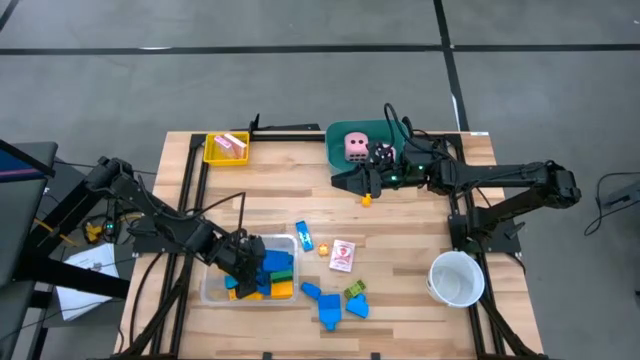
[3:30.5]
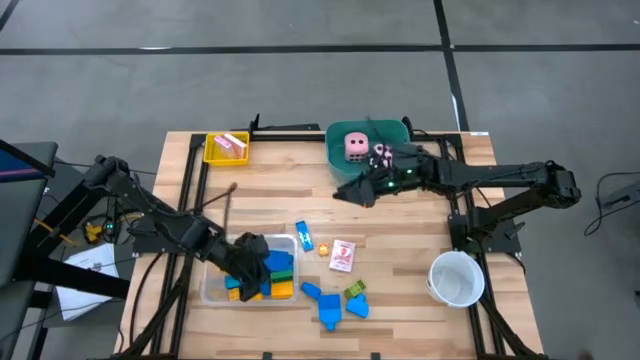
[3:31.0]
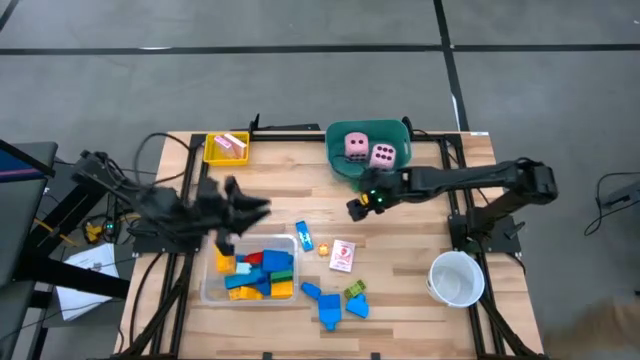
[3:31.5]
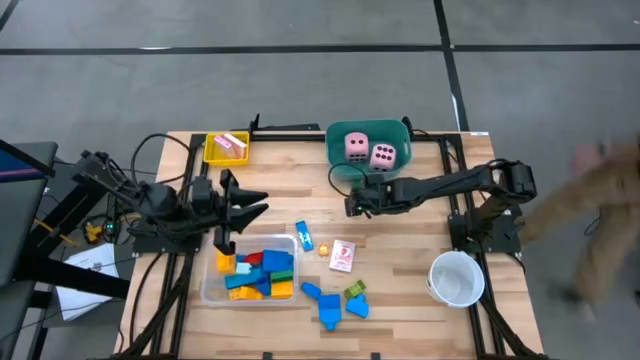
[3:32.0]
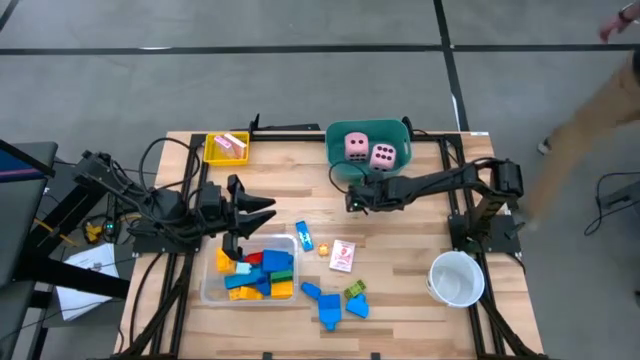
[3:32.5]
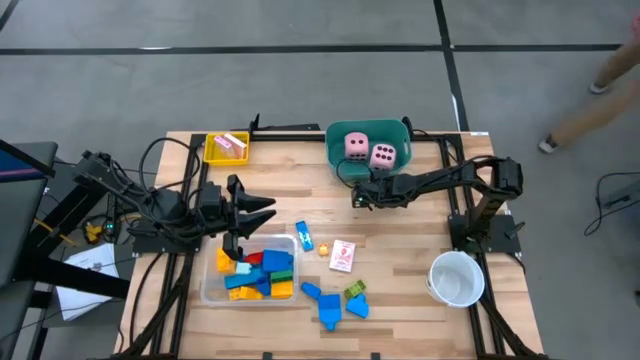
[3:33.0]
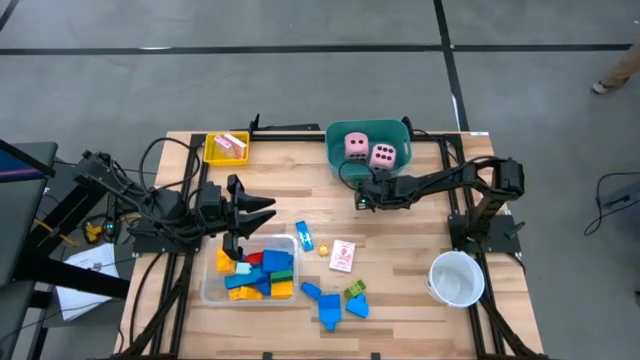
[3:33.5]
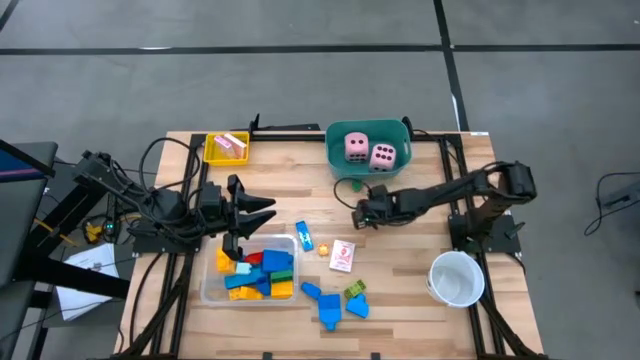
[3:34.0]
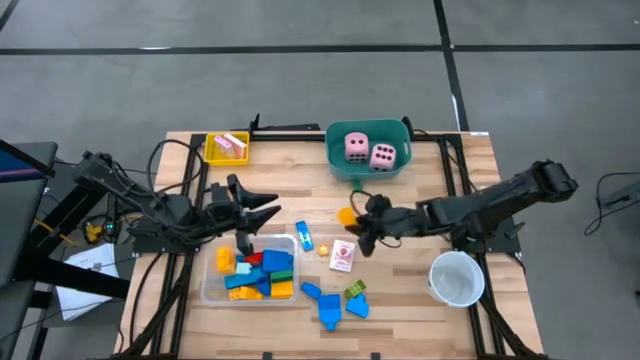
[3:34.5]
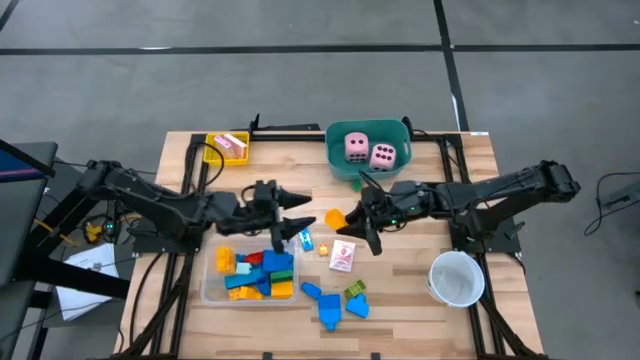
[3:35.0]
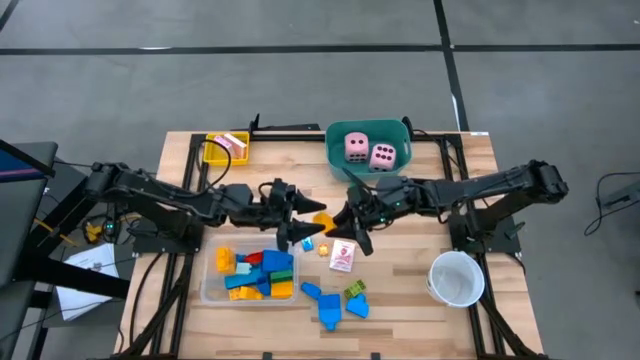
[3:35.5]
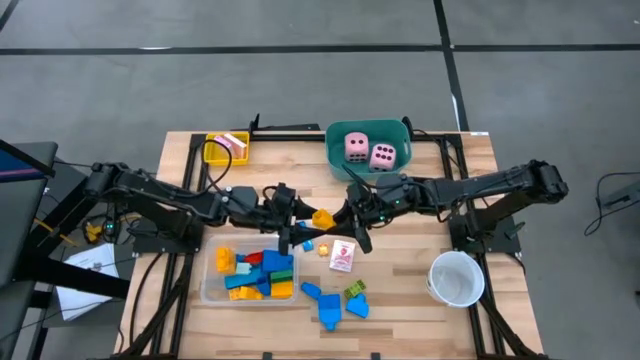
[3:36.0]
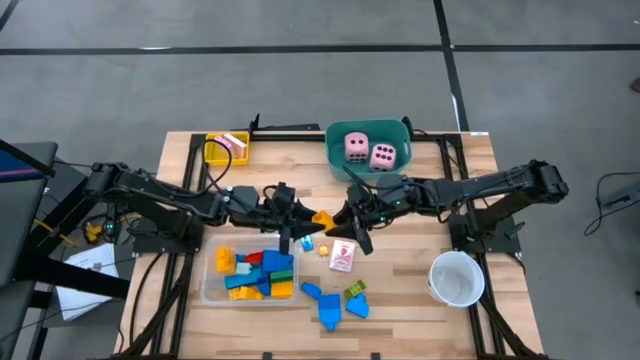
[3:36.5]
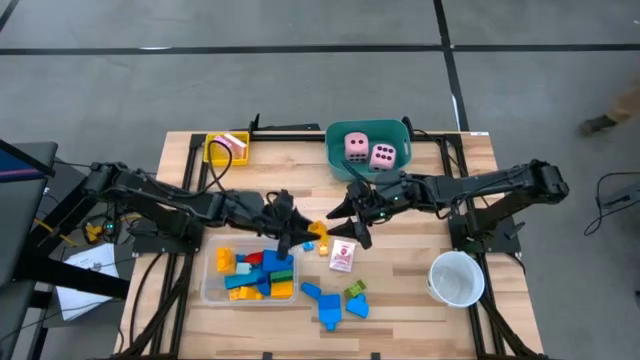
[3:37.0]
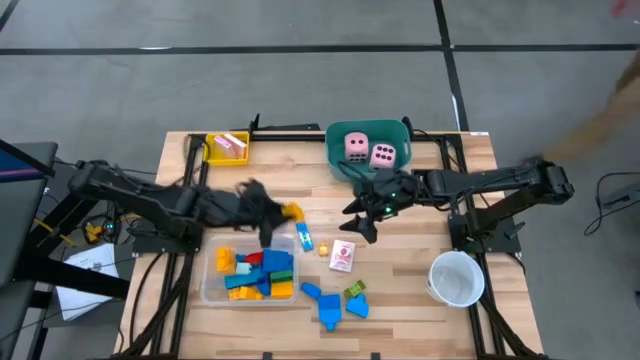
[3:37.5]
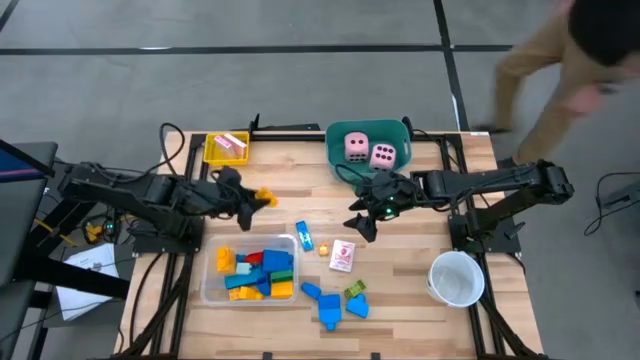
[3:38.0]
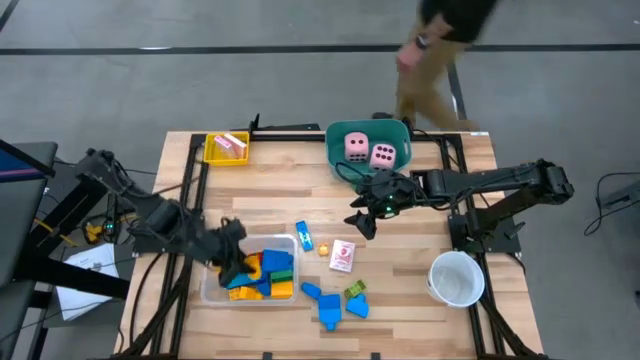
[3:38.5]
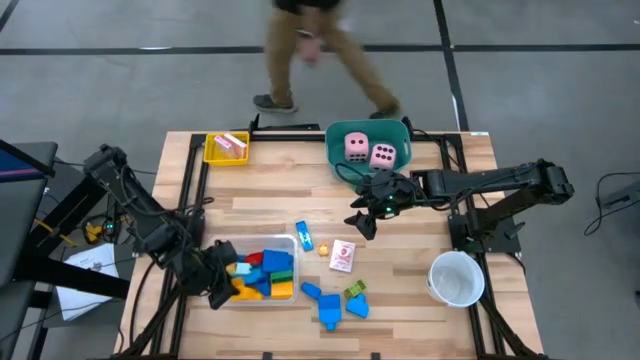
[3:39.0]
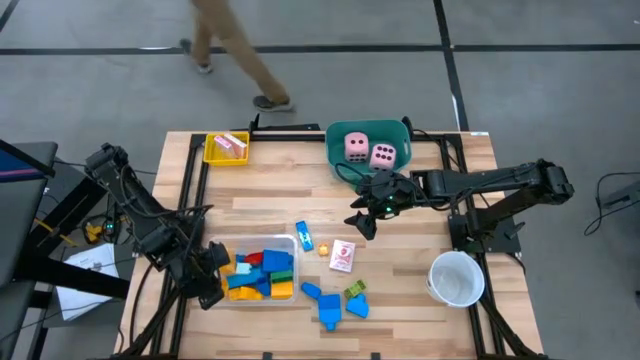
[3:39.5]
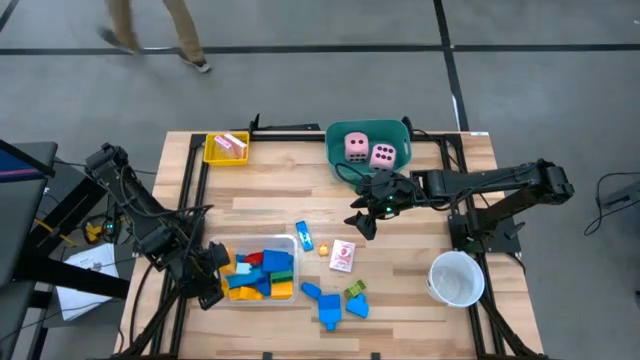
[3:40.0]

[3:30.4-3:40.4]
Task: Pick & Place Toys
Put the yellow game piece into the transparent bin

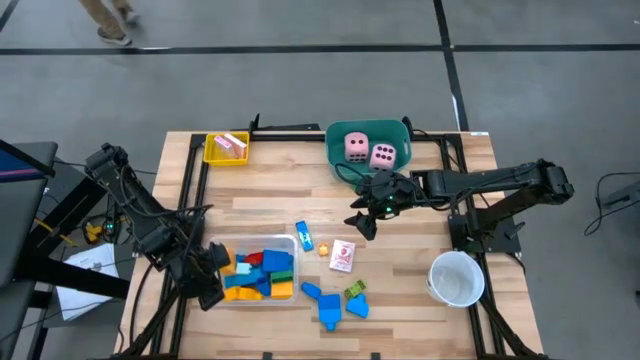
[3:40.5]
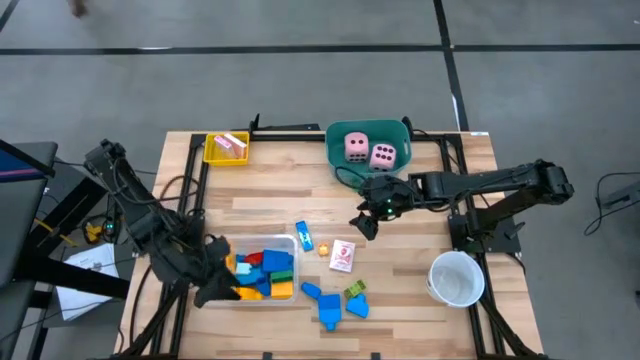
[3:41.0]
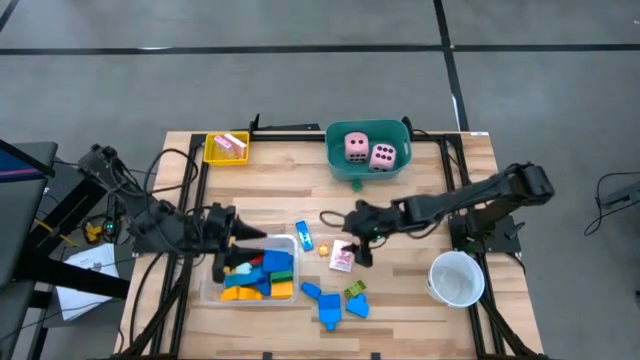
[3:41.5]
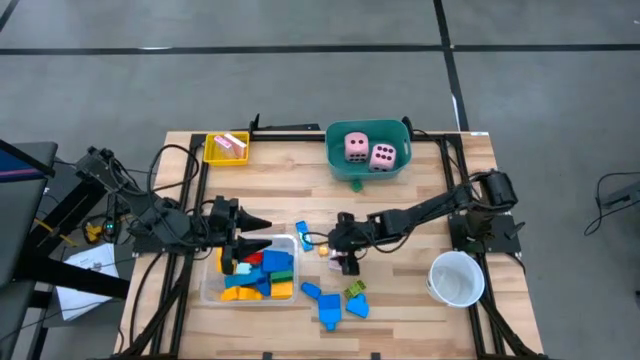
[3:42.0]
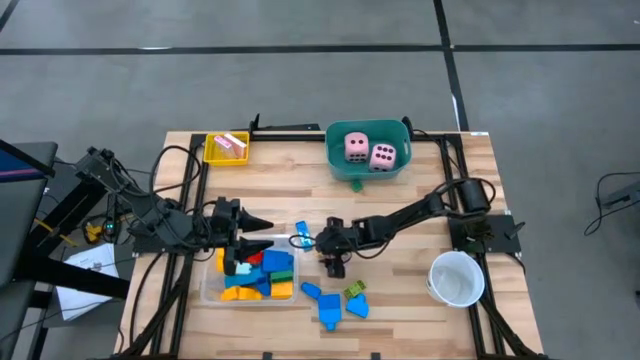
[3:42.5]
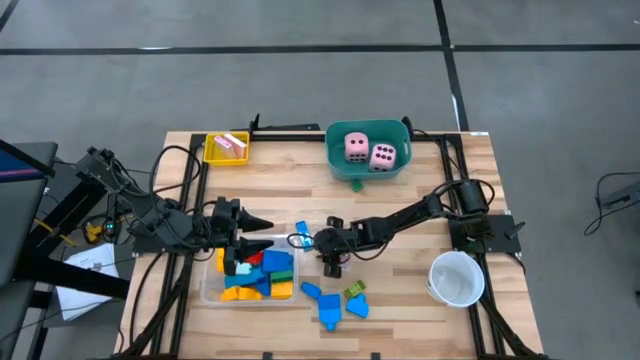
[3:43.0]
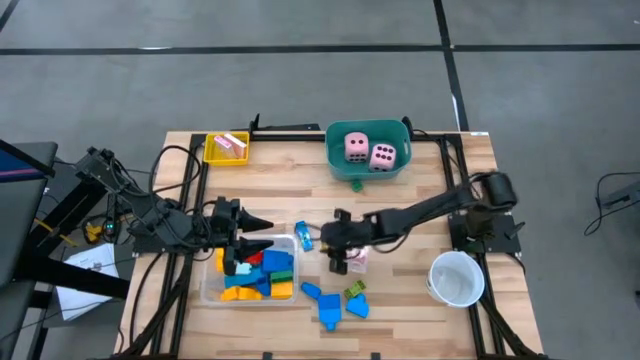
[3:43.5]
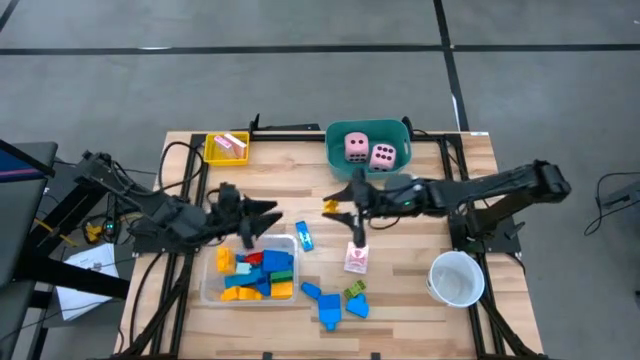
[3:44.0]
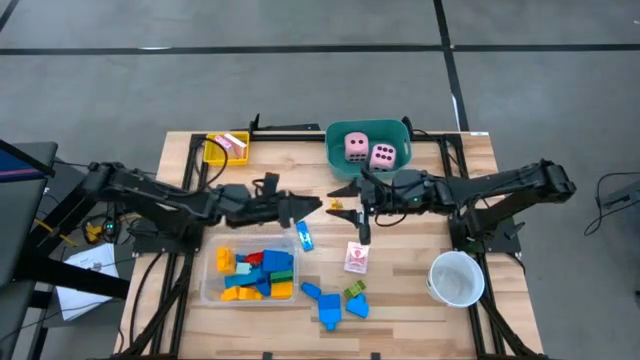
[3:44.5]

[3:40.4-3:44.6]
Put the yellow game piece into the transparent bin

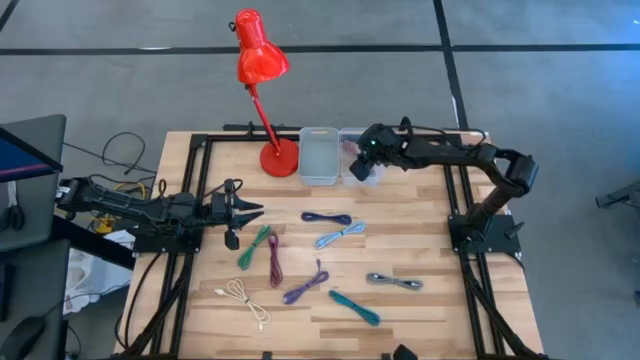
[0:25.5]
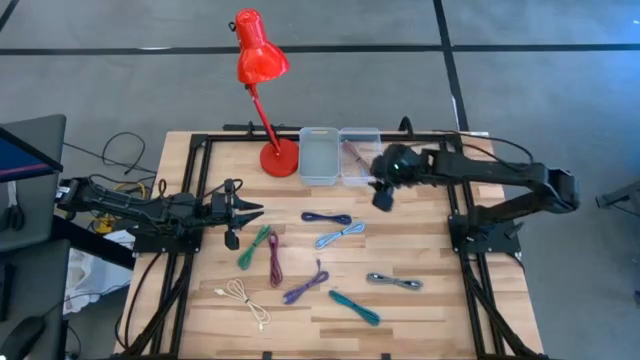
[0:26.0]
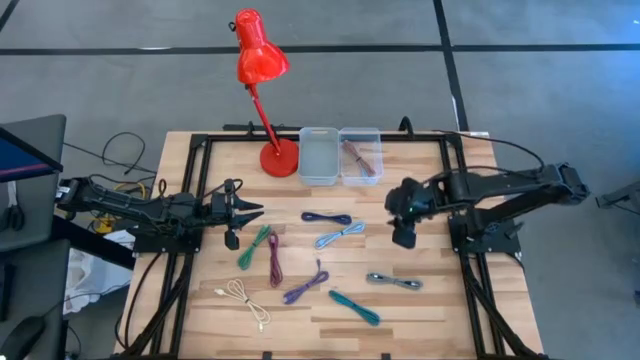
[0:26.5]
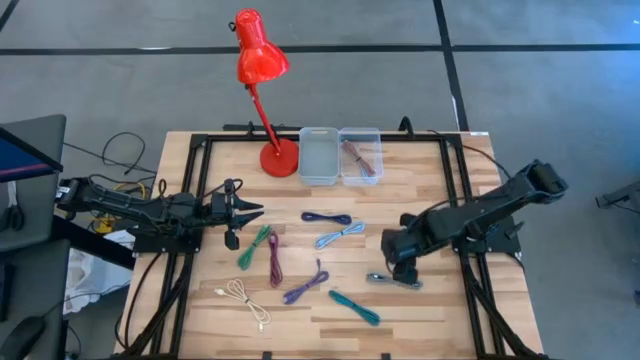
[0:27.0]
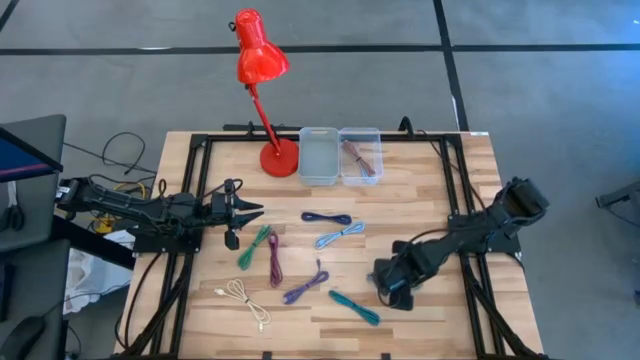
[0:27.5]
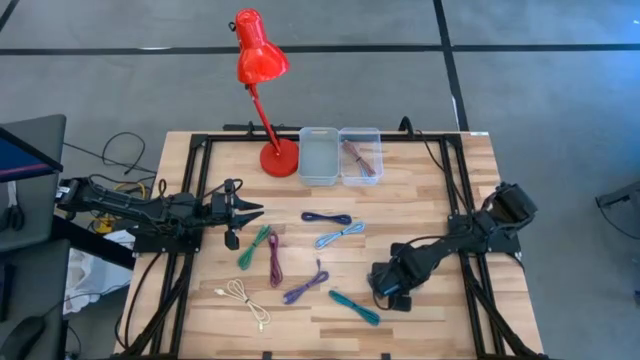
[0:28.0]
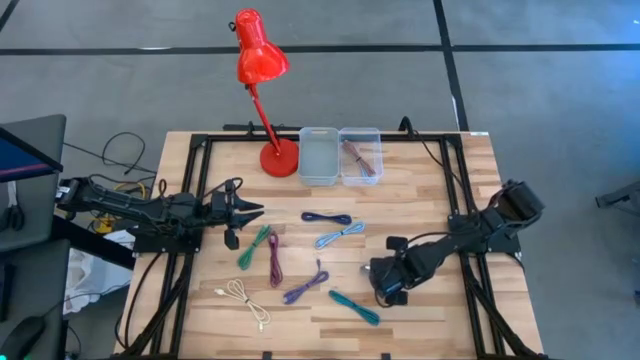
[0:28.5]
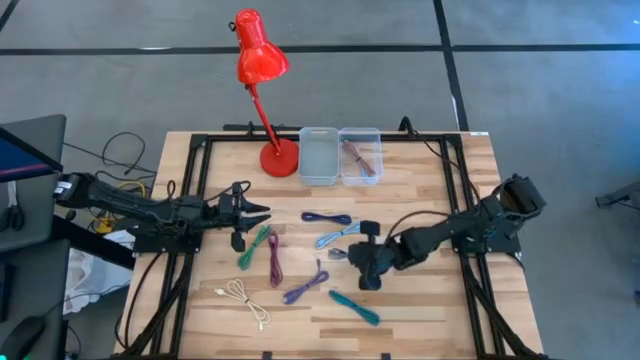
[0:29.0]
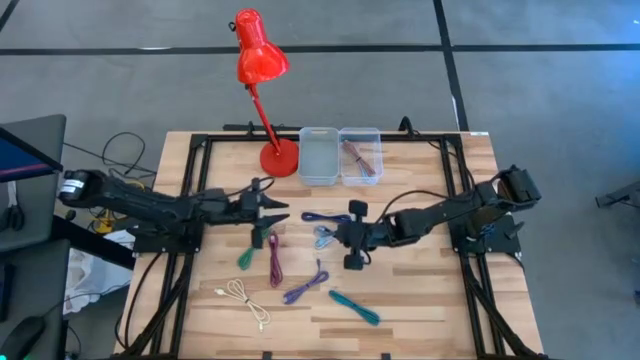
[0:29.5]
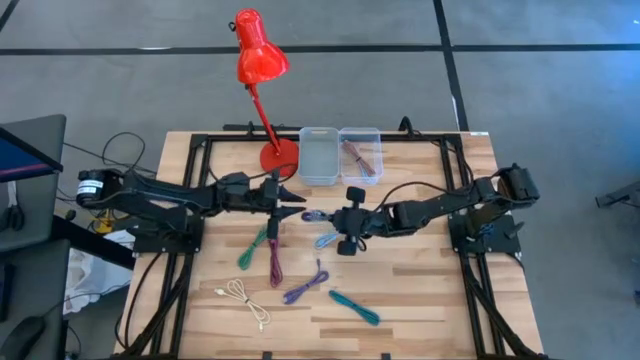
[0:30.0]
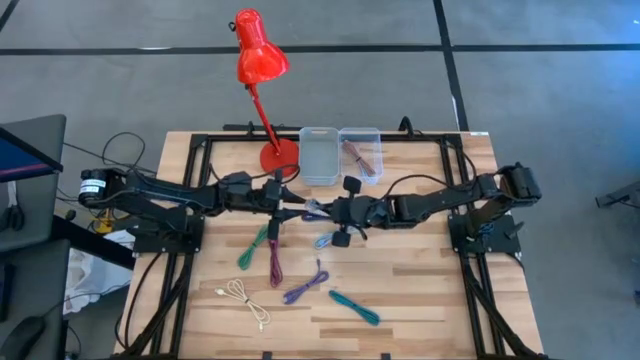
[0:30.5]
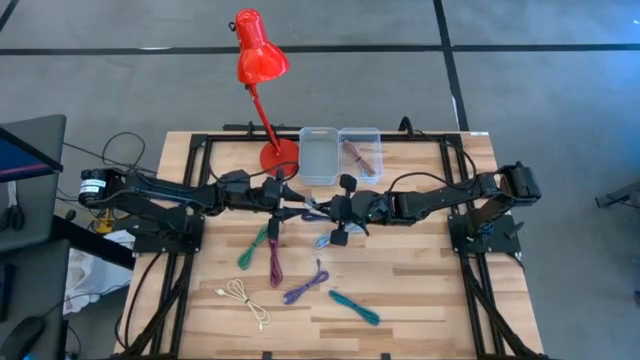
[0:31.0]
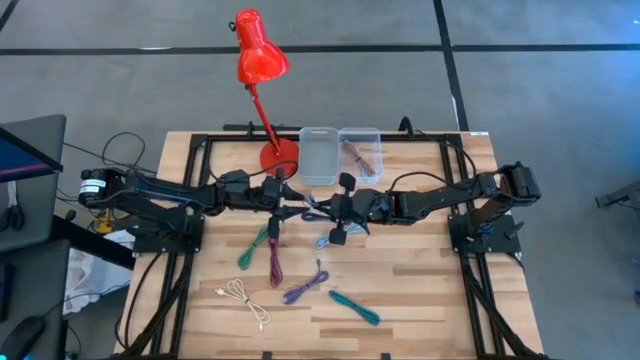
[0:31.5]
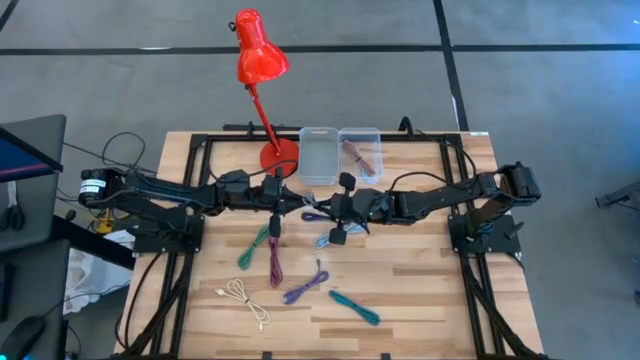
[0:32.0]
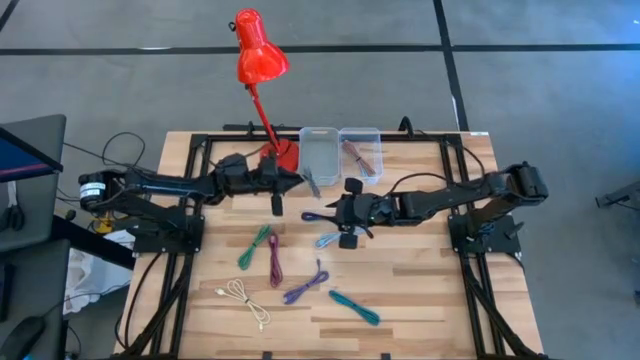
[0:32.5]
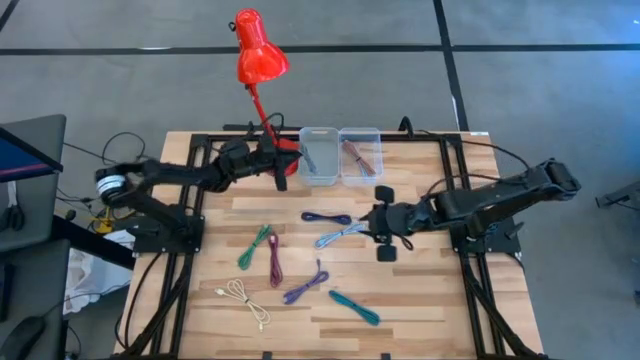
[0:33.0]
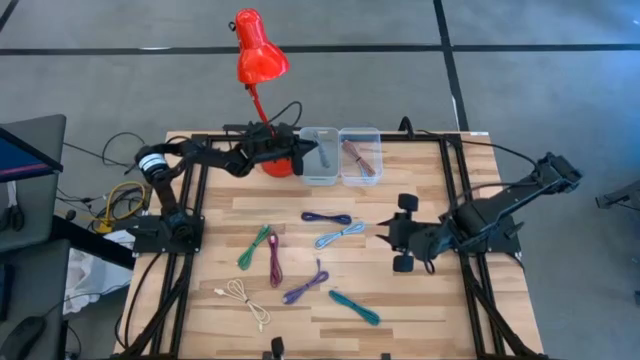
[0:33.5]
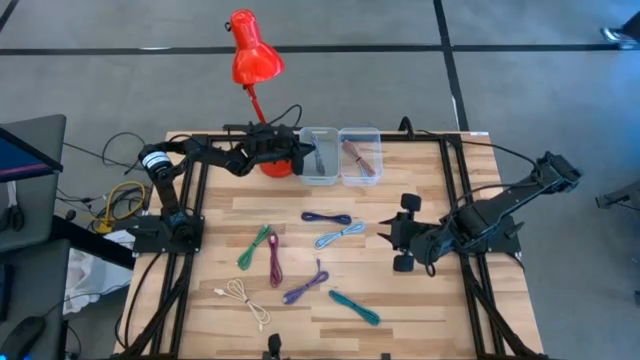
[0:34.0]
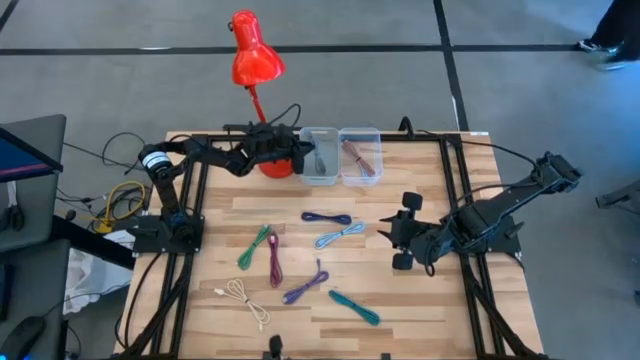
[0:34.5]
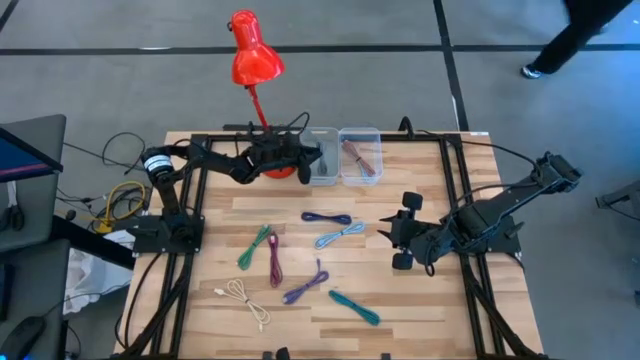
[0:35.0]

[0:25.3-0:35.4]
Task: Pick & Place USB Port
Put the black and white charger cable into the gray bin
